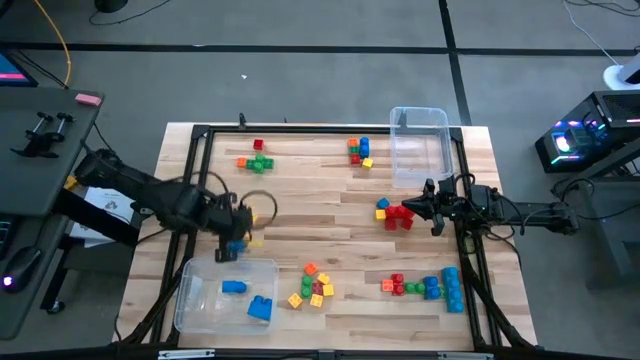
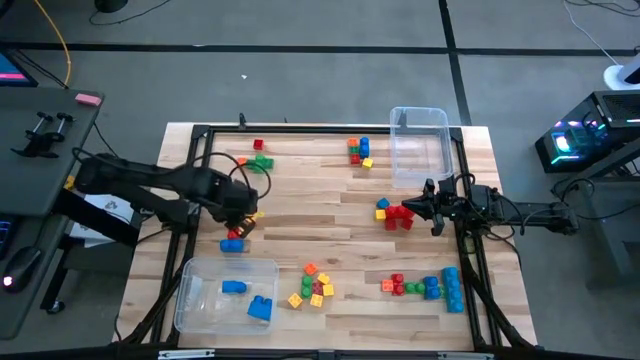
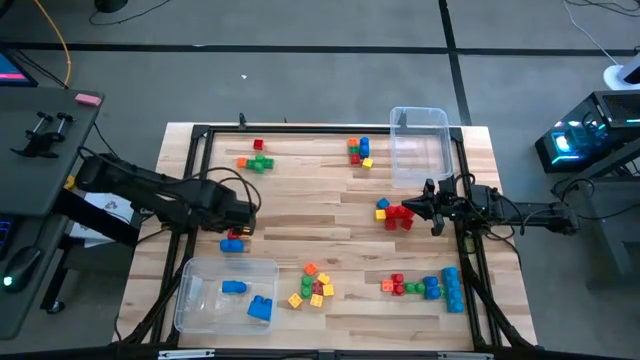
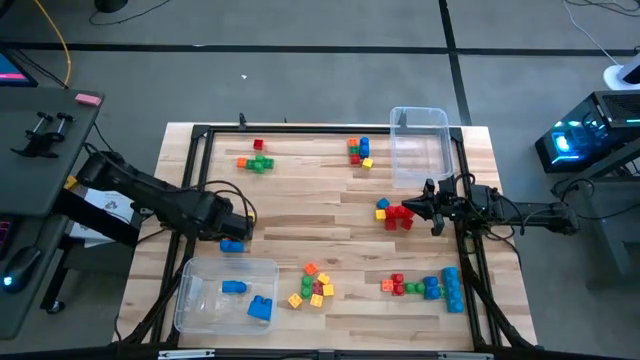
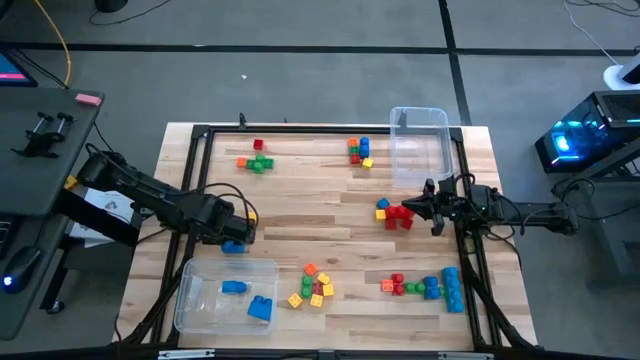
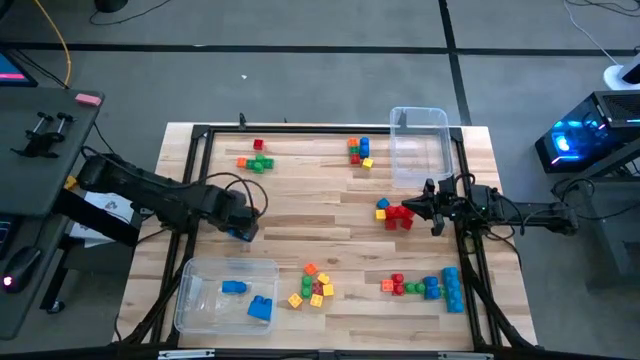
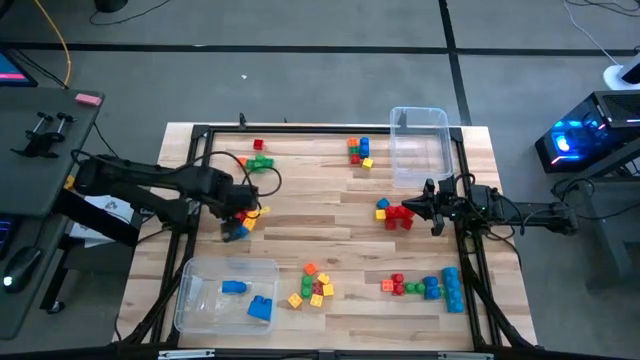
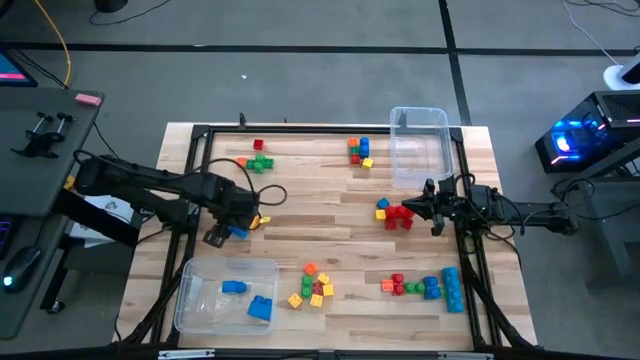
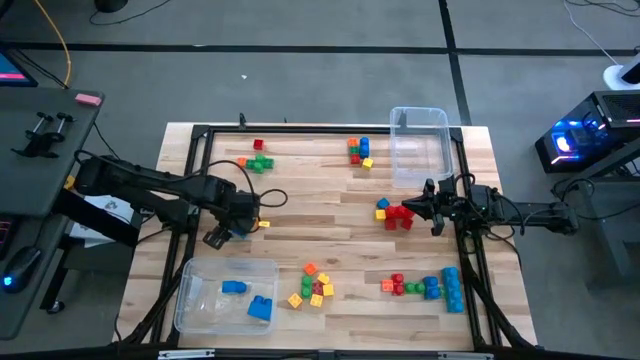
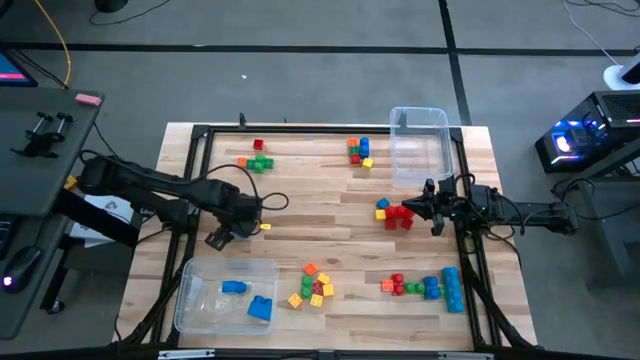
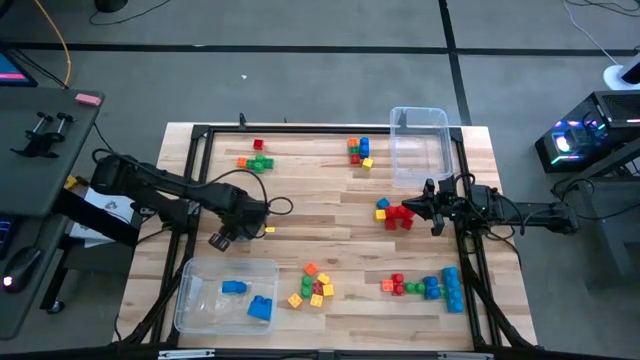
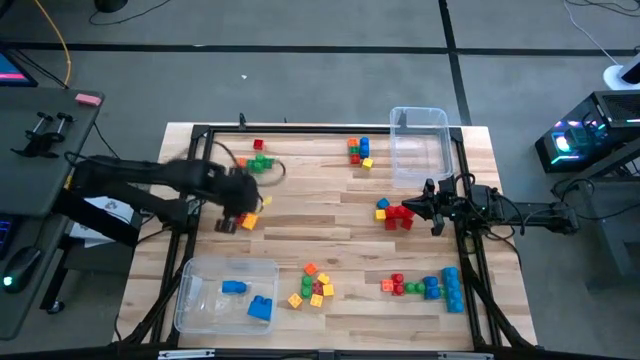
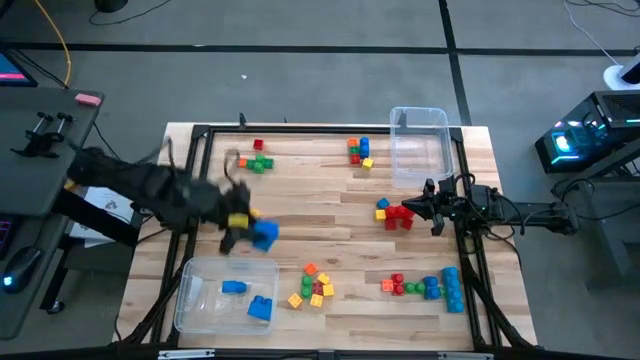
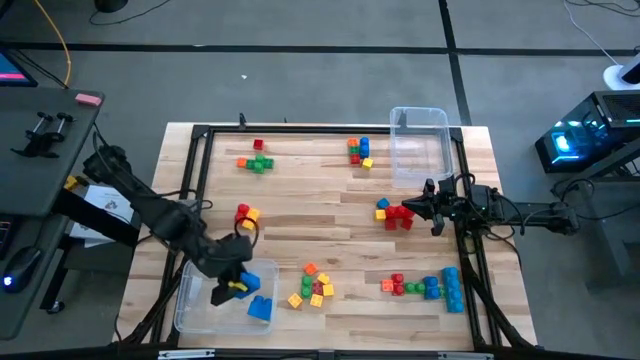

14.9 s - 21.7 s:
Task: Sort blocks by size
Put the large blue game piece into the left transparent bin

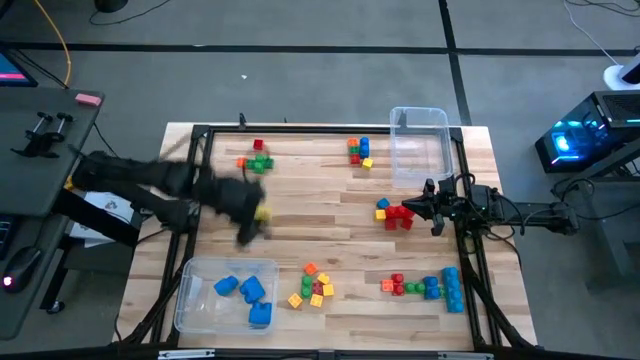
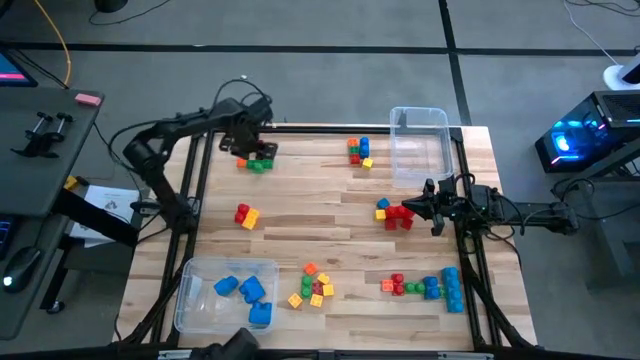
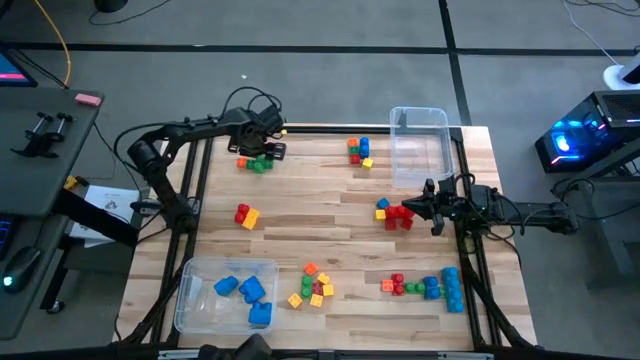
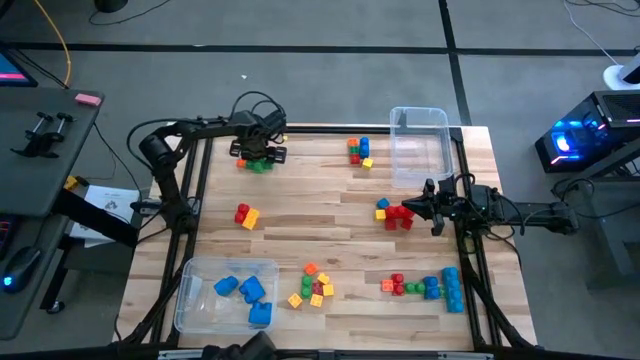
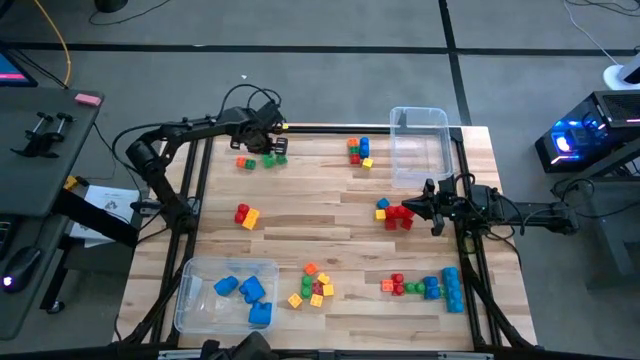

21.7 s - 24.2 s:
Put the large green game piece into the left transparent bin

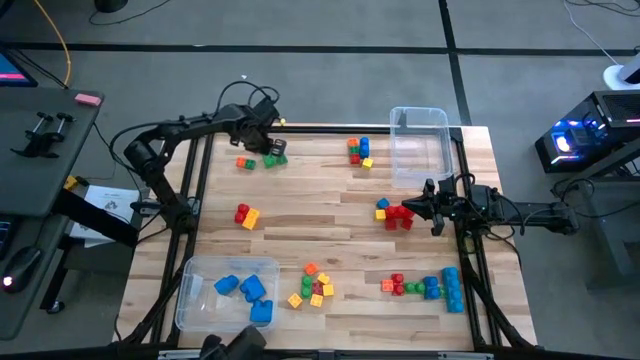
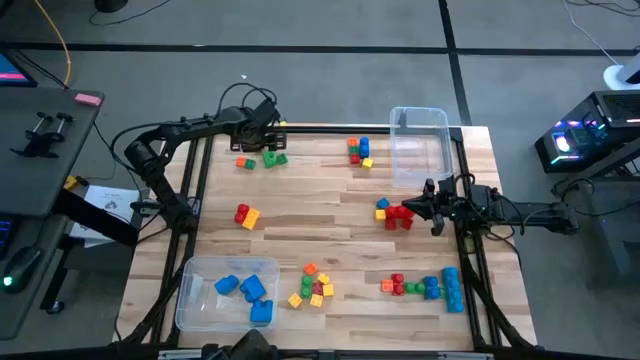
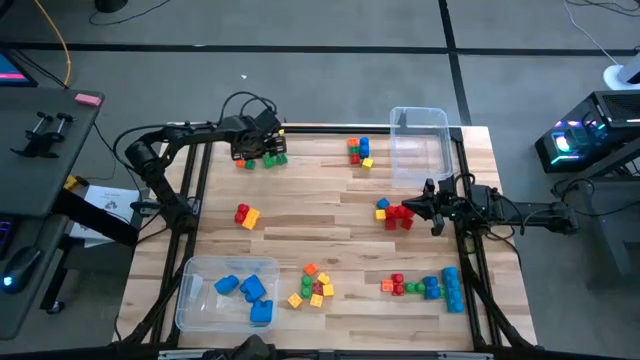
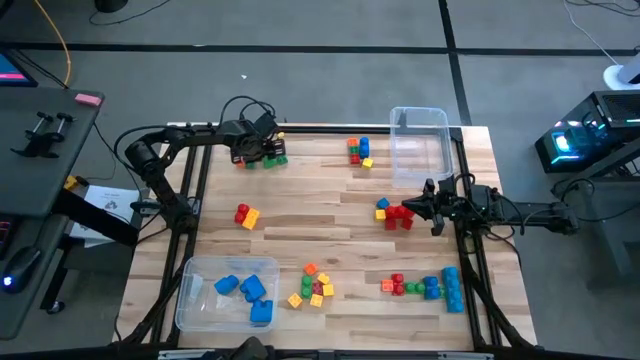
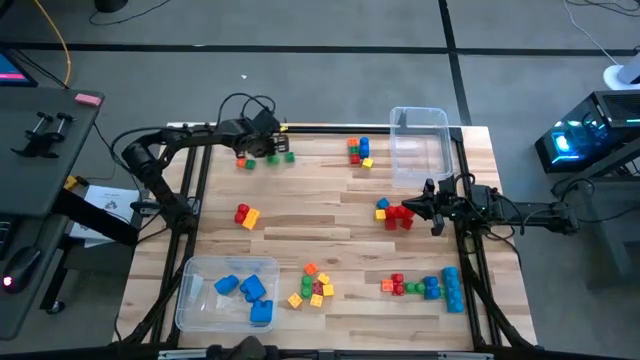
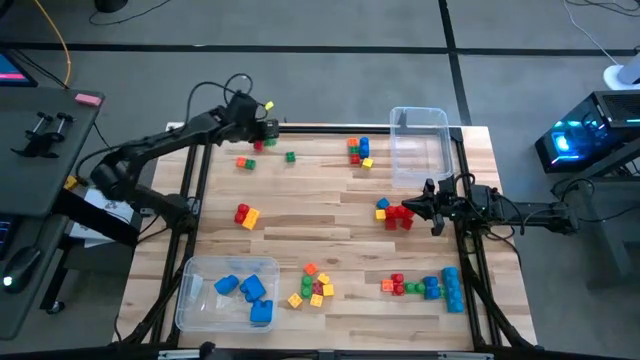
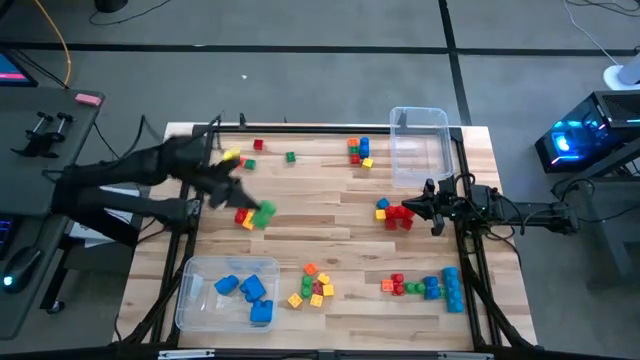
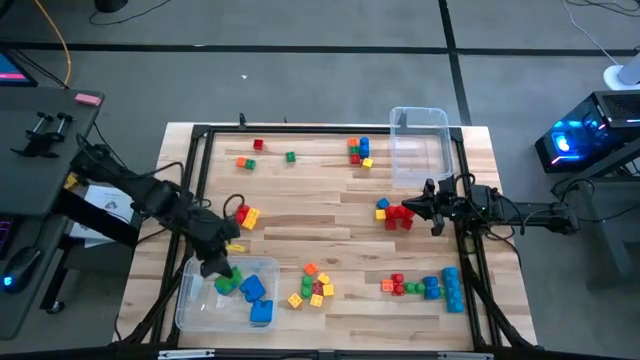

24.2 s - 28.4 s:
Put the large green game piece into the left transparent bin

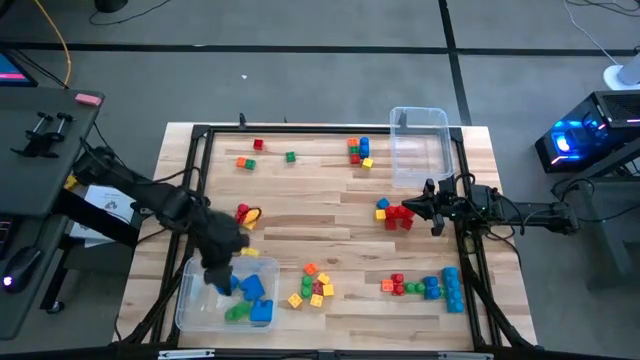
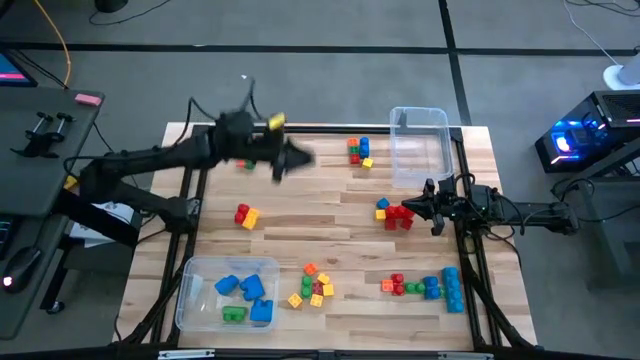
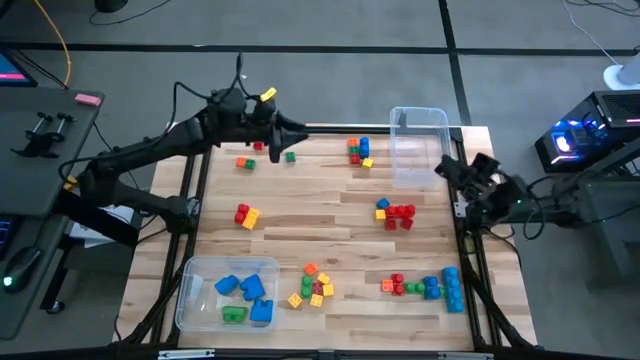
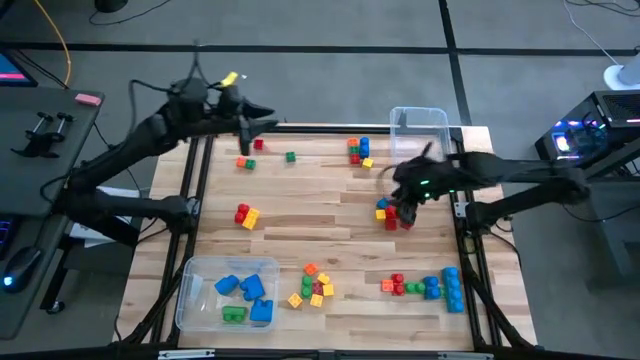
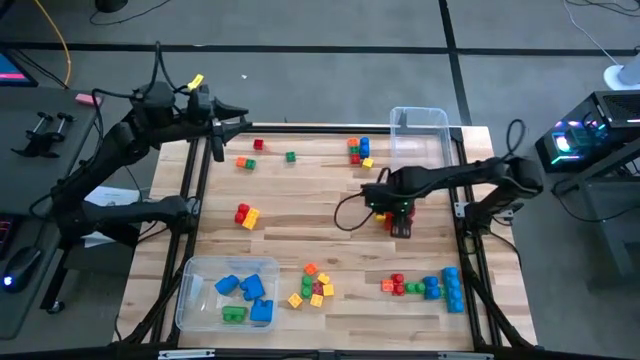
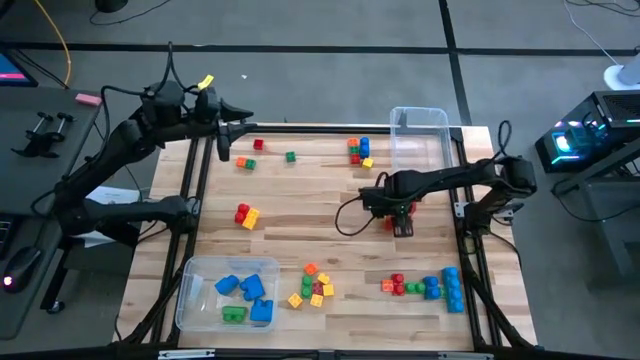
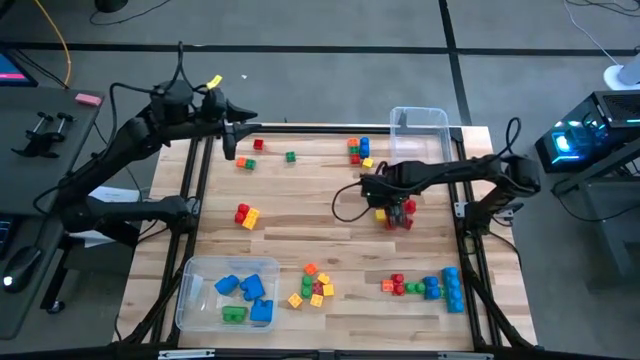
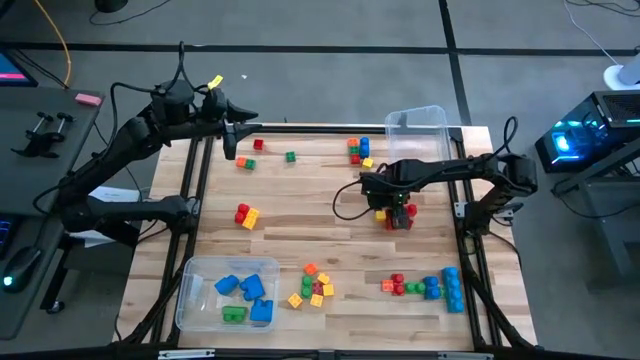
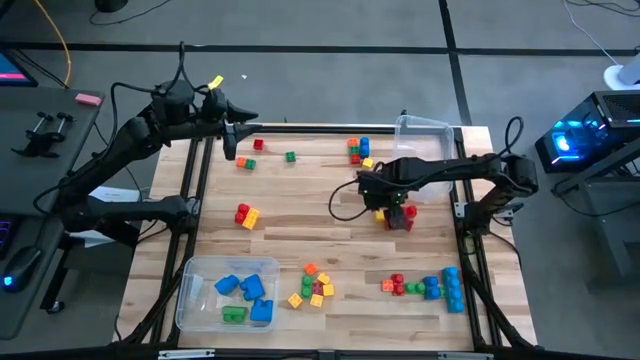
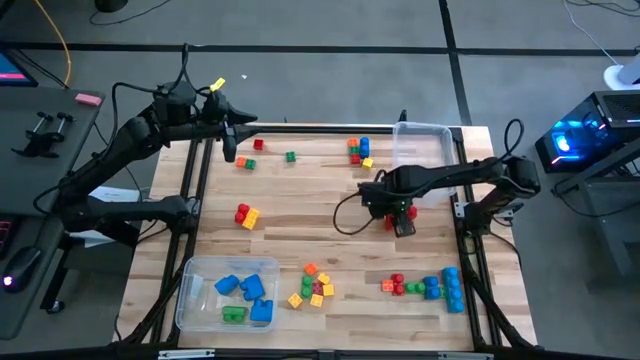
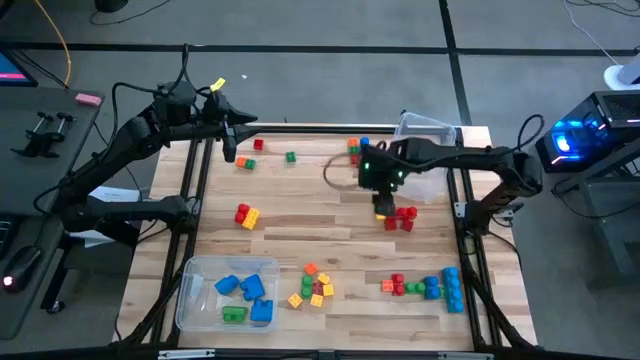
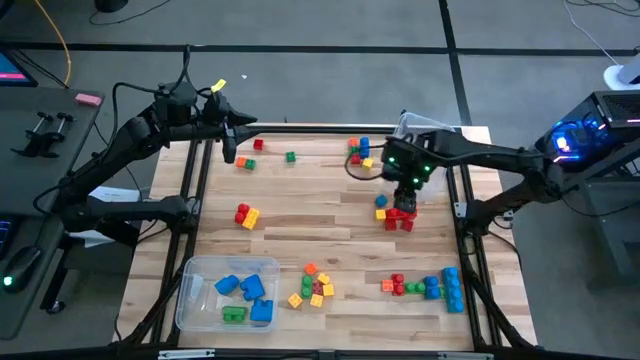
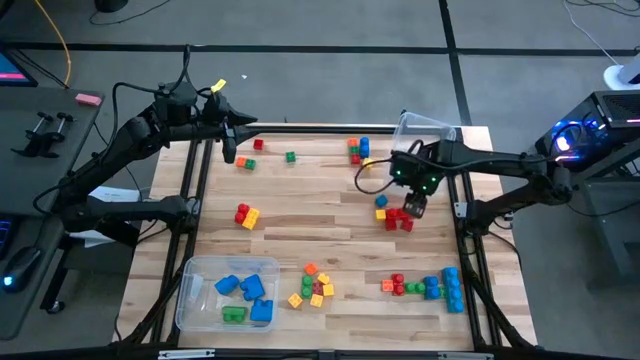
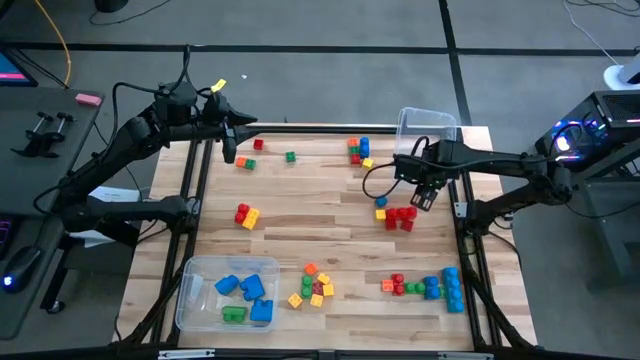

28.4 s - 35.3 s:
Adjust the right transparent bin
